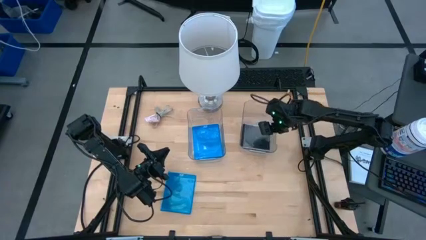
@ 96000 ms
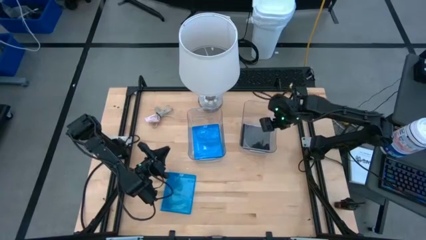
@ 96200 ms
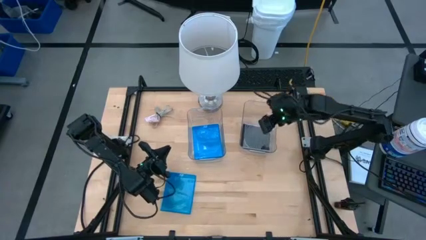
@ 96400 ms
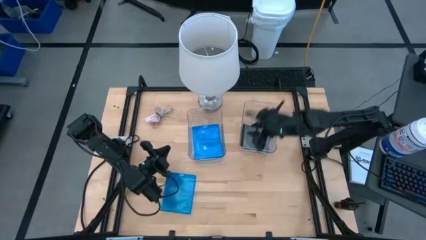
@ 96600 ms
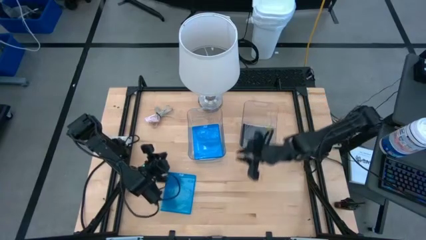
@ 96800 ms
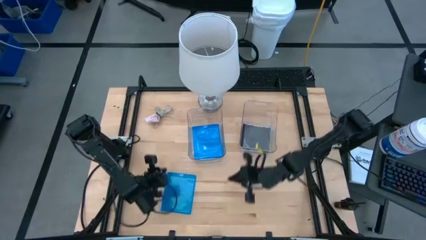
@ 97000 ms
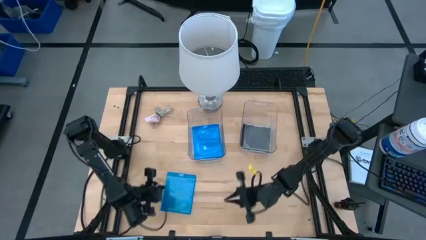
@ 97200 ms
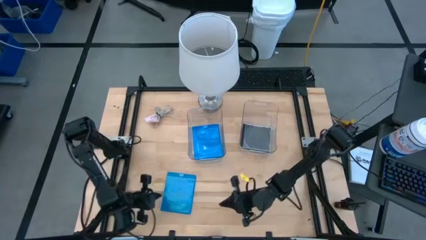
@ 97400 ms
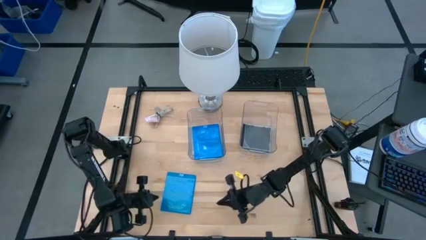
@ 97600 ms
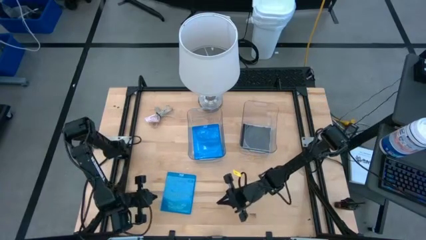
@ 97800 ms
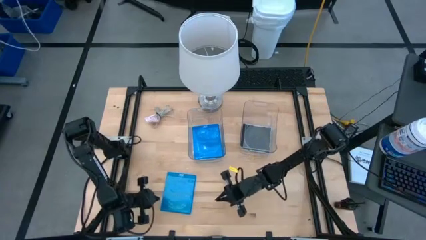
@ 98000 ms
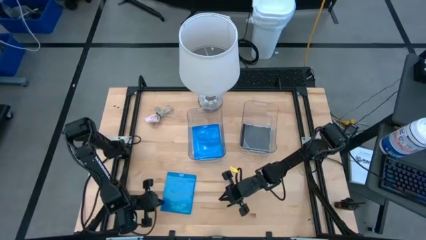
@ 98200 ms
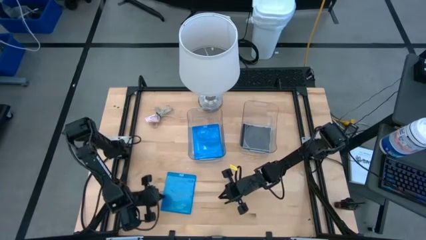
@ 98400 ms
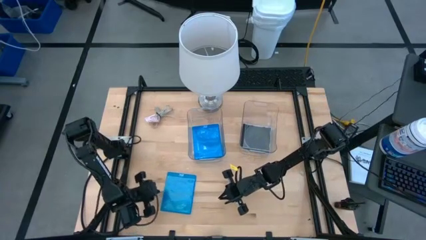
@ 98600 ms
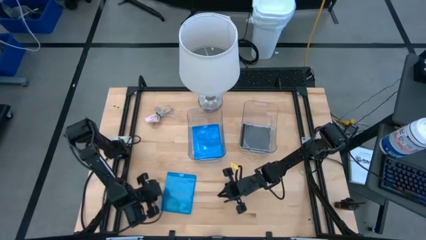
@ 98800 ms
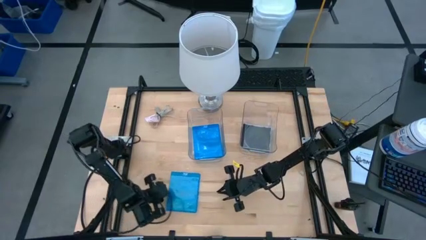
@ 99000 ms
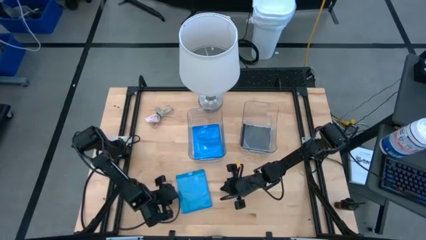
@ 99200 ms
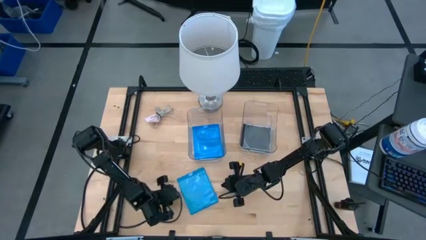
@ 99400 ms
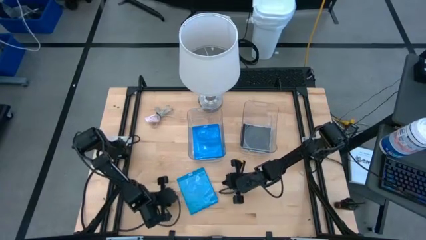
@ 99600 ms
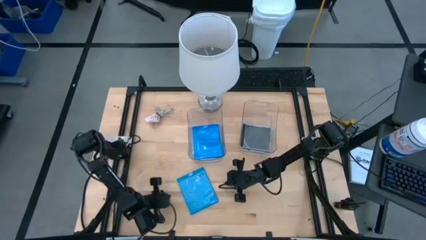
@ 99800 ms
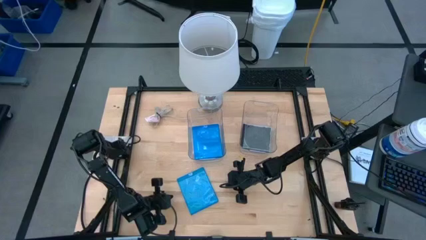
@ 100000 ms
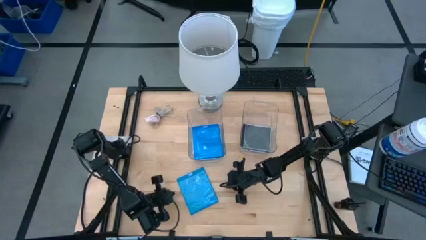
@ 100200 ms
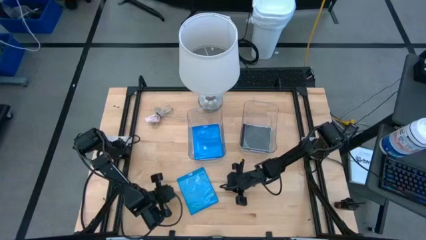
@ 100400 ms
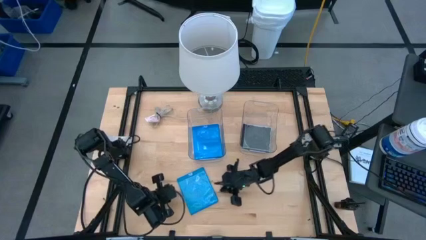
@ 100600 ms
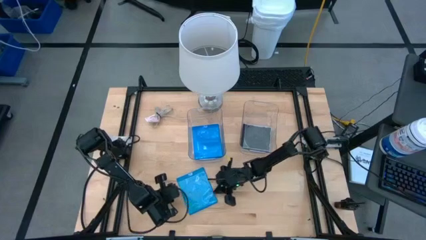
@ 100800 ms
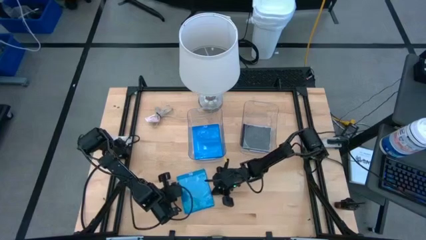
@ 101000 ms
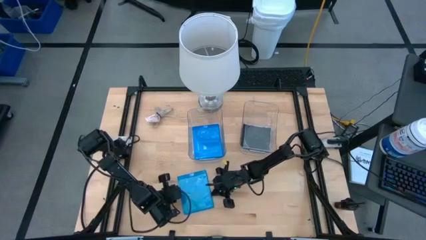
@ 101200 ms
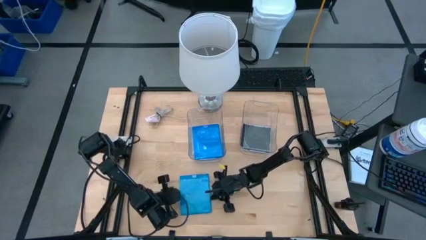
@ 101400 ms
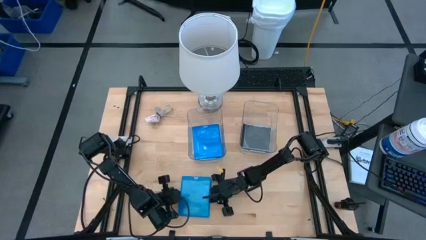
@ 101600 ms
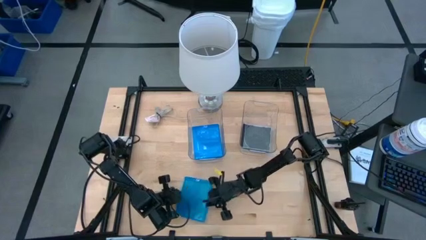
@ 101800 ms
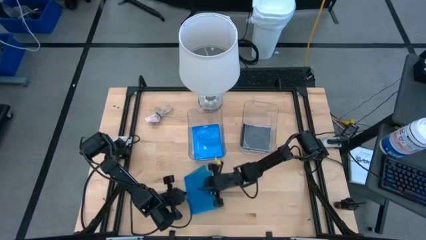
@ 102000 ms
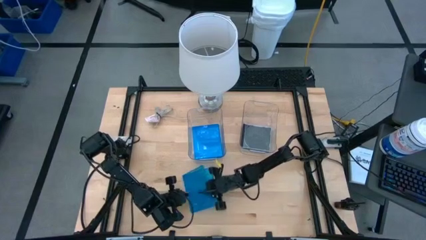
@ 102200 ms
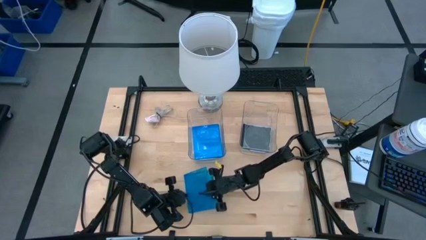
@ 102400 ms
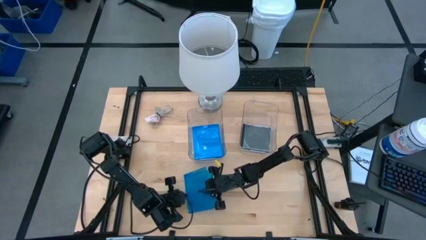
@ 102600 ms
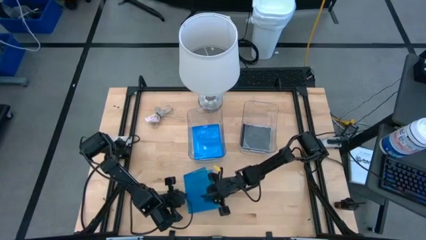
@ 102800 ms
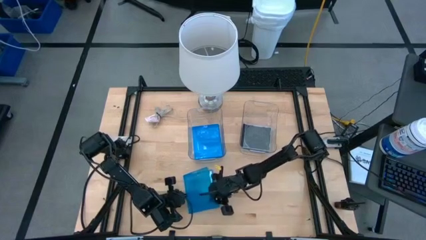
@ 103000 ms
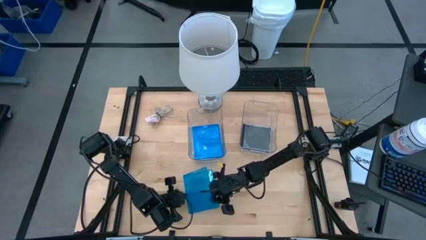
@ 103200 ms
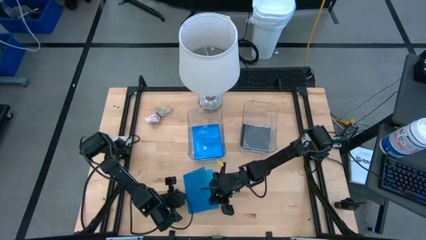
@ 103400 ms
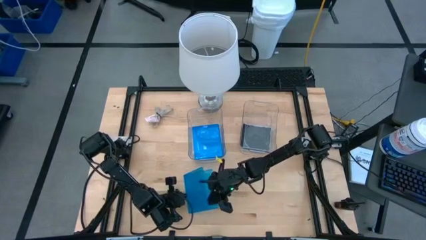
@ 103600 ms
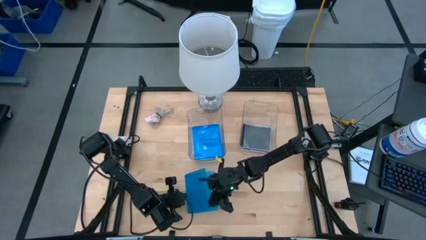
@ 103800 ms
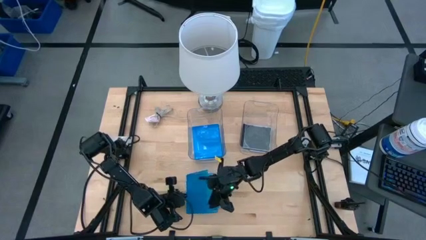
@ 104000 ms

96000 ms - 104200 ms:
Task: Pick & place jewel cases by type
Put the blue cd case into the left transparent bin
